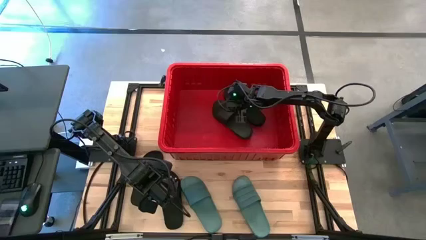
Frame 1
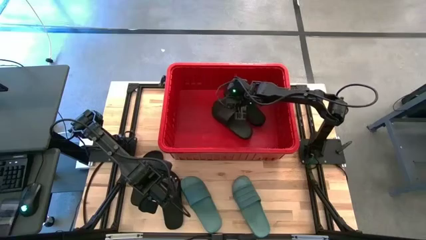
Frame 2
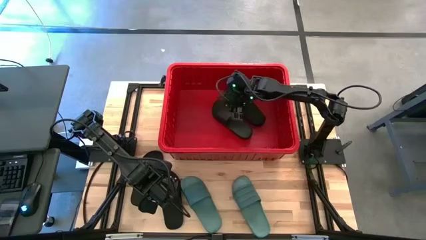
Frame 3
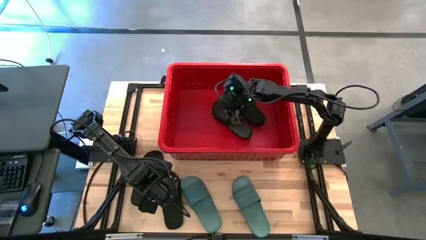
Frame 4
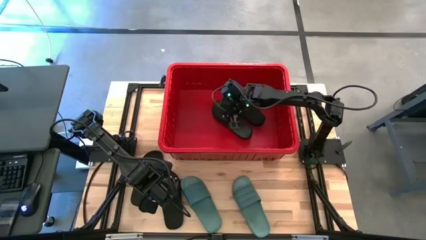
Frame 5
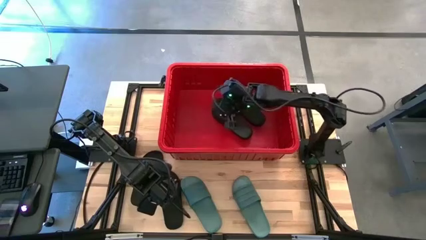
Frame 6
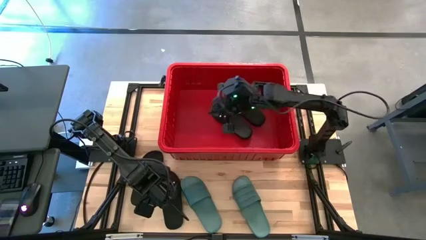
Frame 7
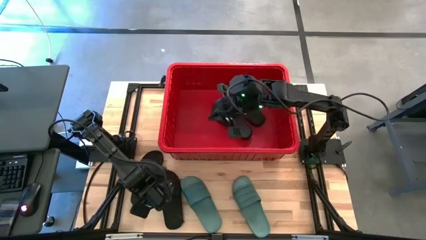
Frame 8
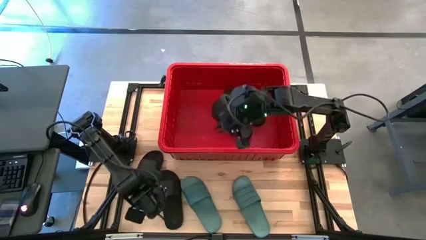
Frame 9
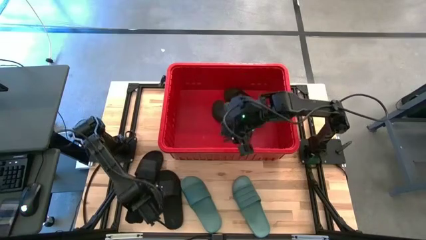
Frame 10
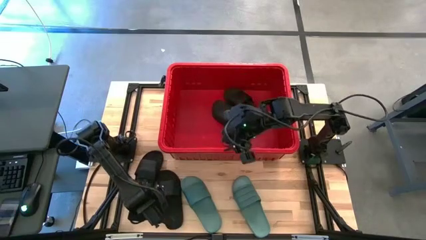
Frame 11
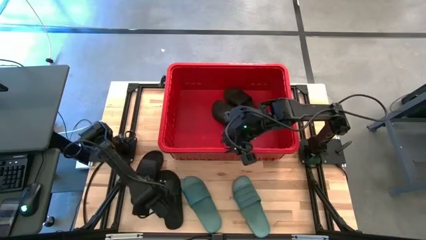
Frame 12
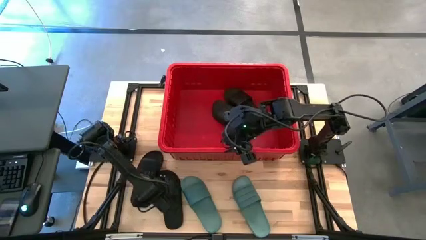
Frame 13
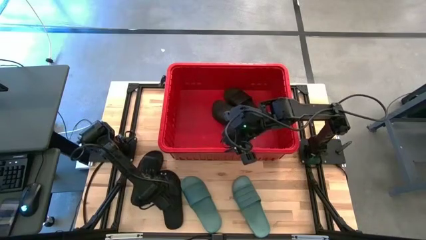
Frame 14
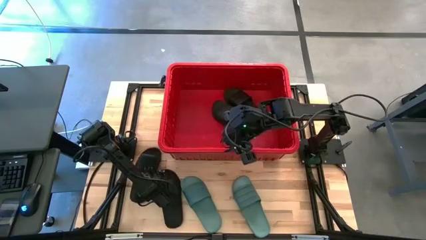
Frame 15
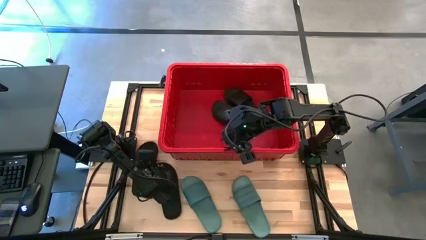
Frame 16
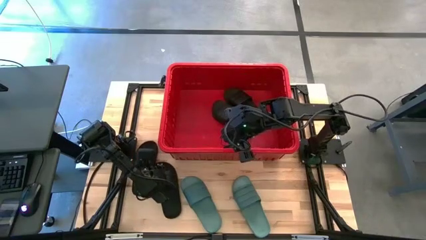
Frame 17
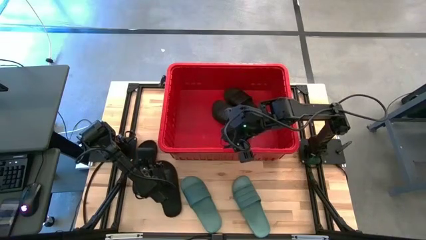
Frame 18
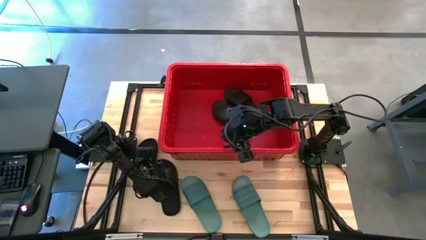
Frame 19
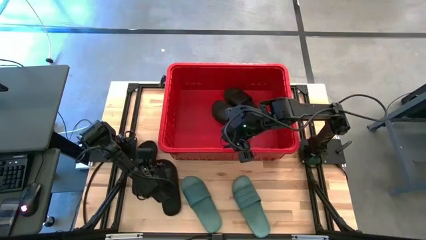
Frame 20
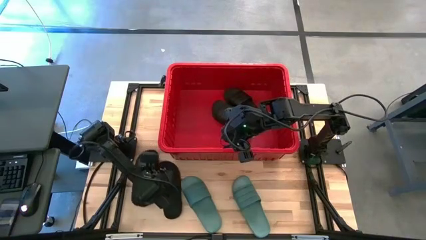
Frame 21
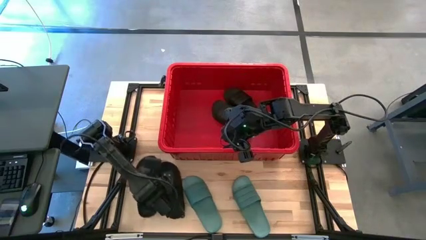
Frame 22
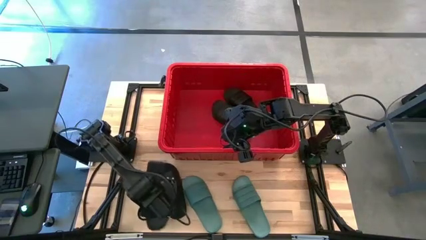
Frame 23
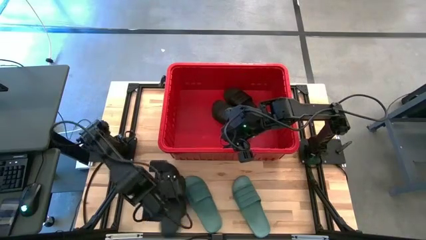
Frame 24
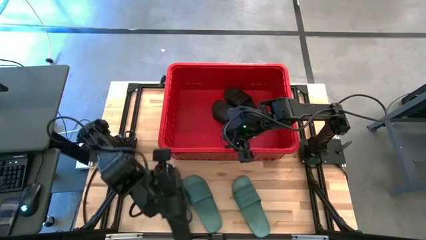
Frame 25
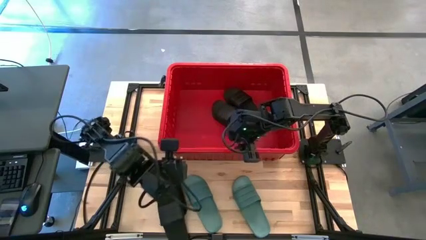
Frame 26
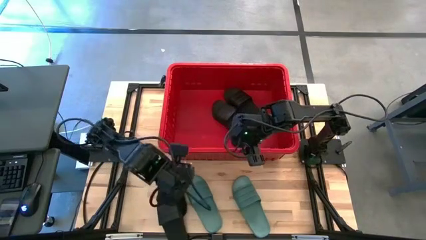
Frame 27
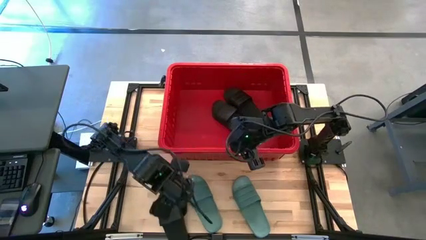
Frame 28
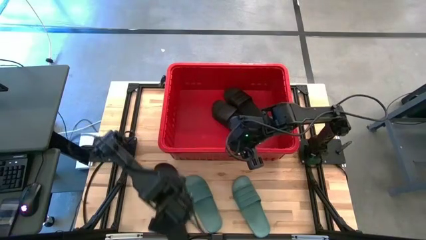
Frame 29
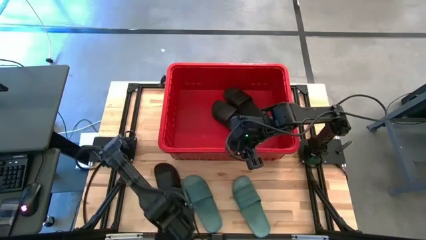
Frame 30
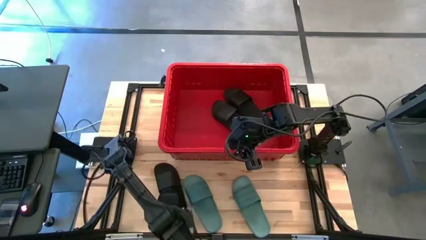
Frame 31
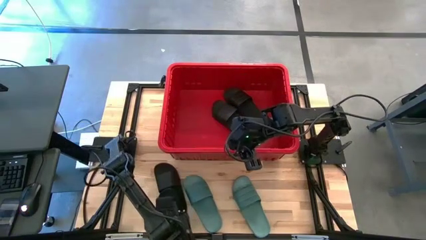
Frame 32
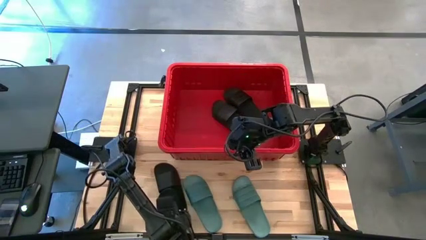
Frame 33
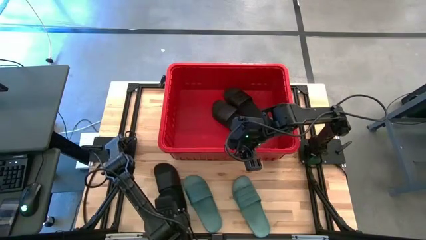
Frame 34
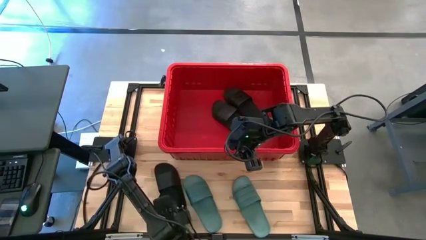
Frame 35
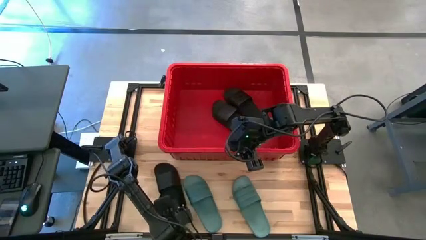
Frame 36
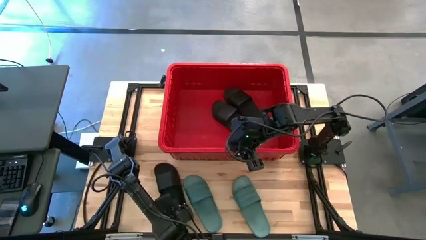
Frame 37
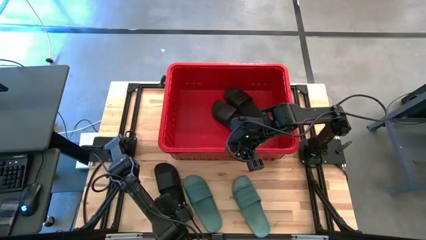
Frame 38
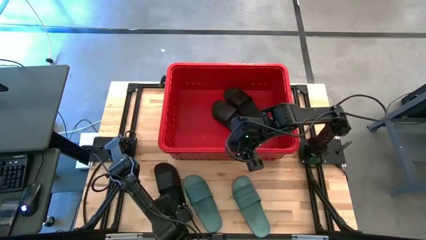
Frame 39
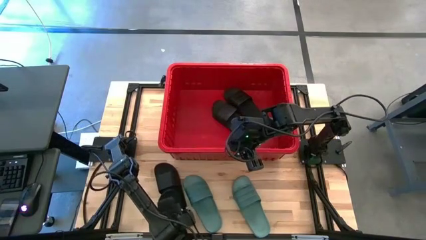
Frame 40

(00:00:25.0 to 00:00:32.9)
Task: Pick and place slides into bin
Put the black slide into the red bin

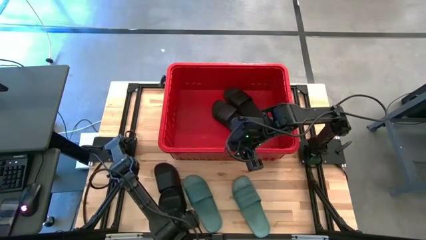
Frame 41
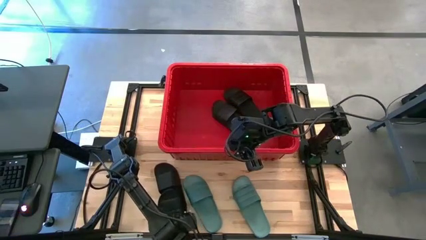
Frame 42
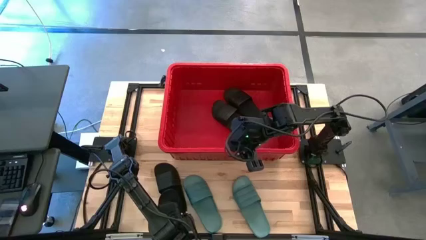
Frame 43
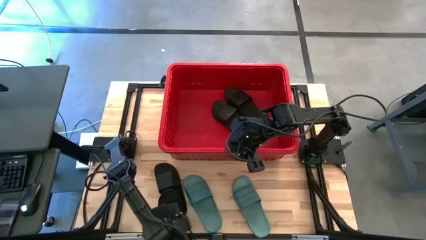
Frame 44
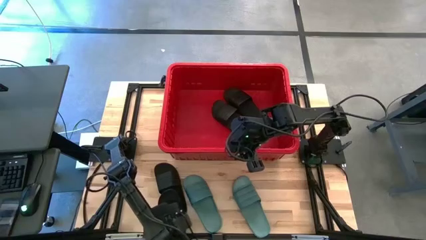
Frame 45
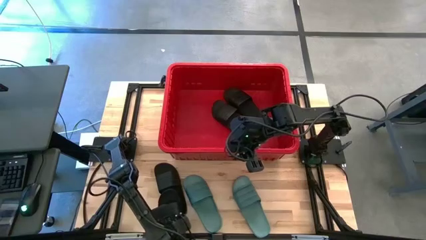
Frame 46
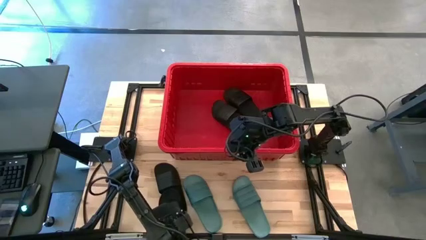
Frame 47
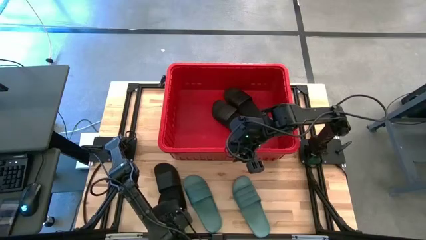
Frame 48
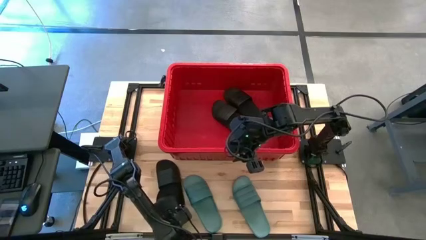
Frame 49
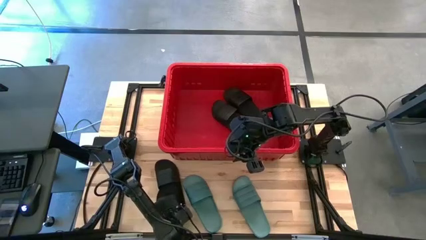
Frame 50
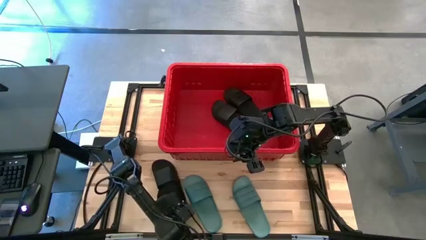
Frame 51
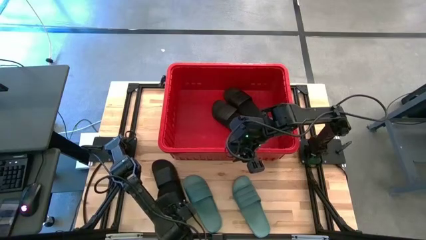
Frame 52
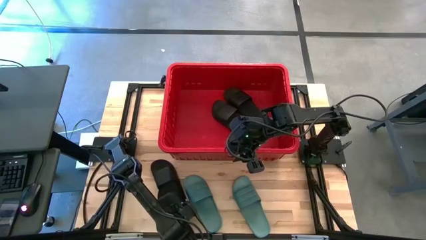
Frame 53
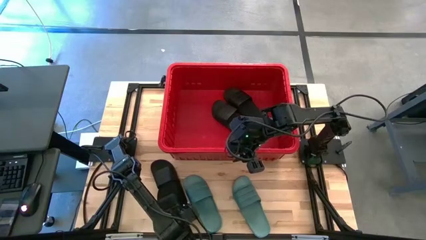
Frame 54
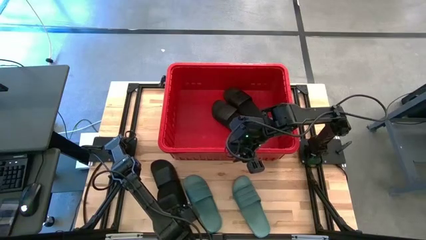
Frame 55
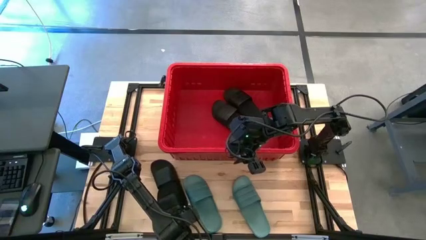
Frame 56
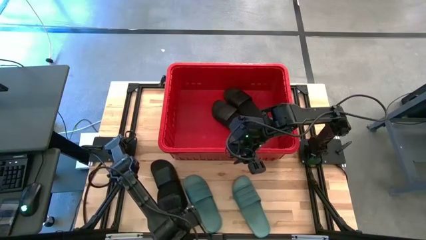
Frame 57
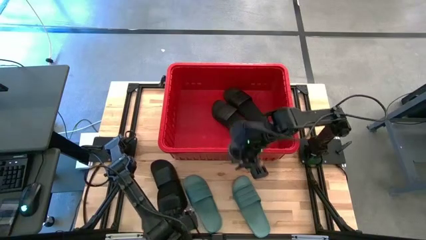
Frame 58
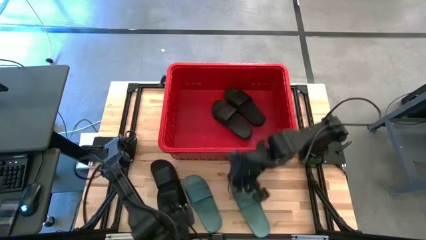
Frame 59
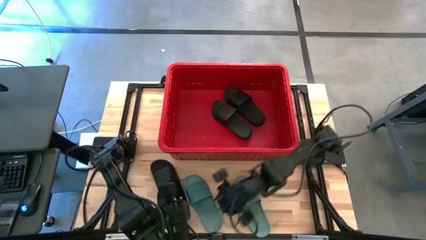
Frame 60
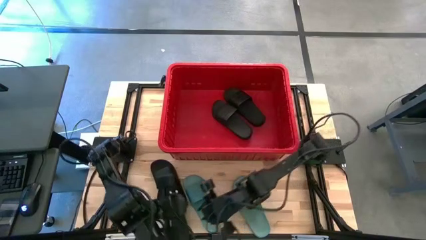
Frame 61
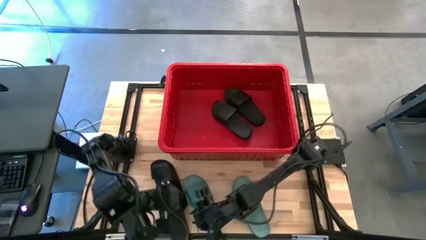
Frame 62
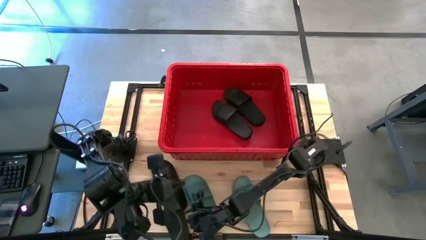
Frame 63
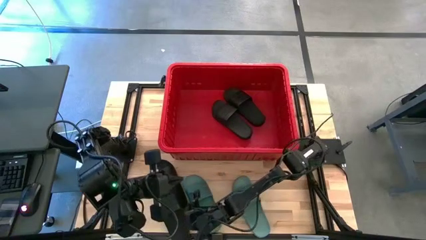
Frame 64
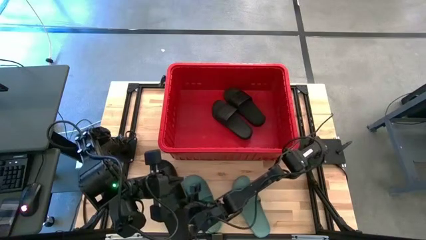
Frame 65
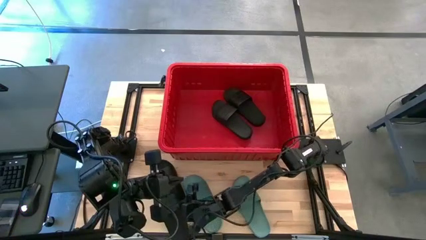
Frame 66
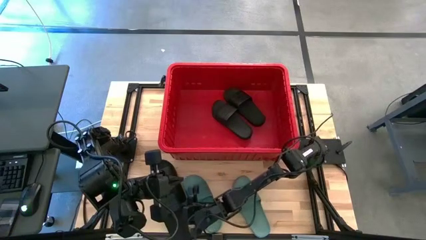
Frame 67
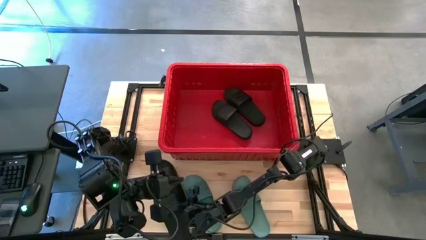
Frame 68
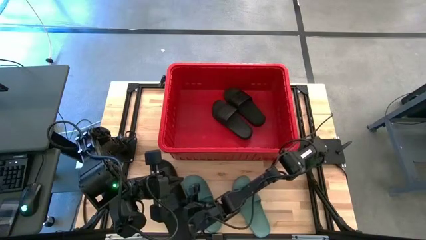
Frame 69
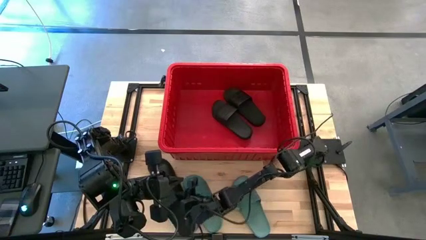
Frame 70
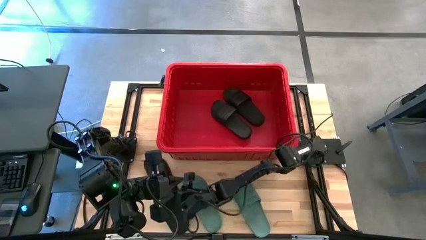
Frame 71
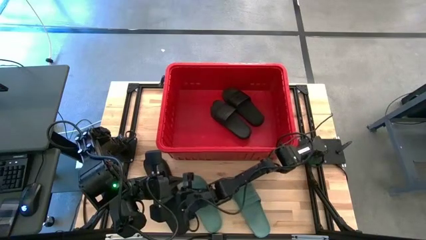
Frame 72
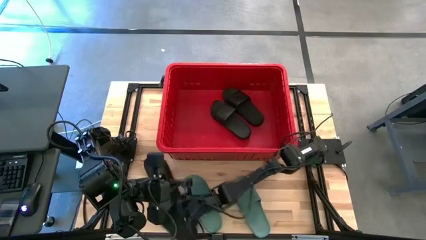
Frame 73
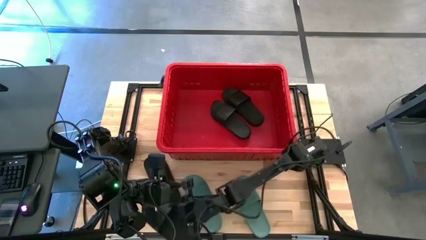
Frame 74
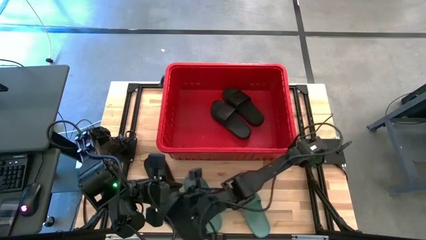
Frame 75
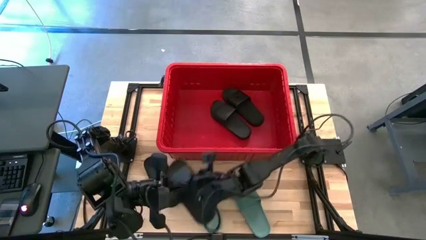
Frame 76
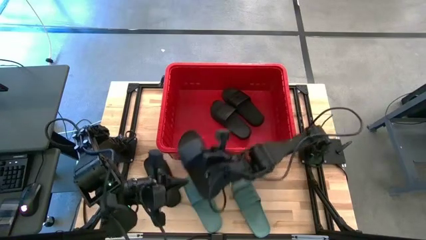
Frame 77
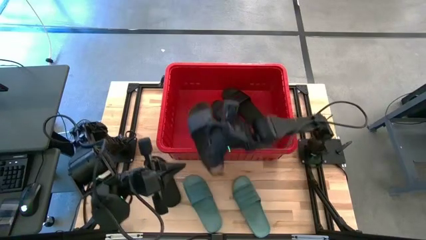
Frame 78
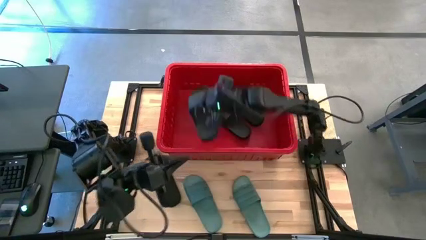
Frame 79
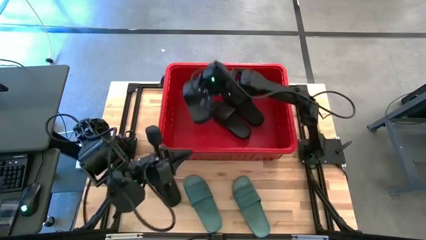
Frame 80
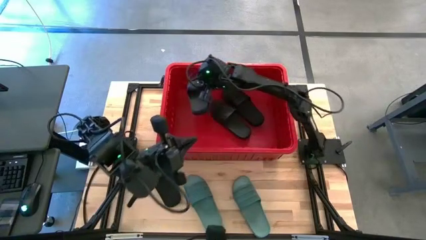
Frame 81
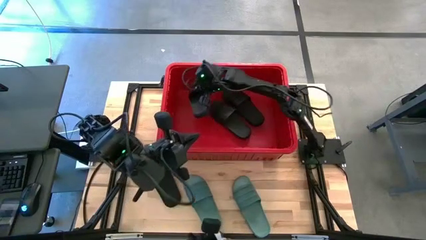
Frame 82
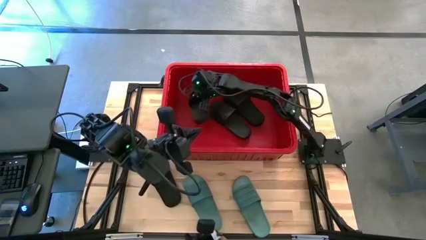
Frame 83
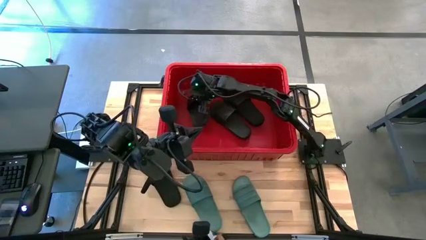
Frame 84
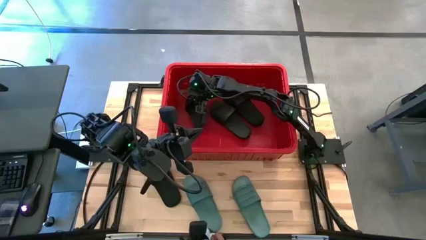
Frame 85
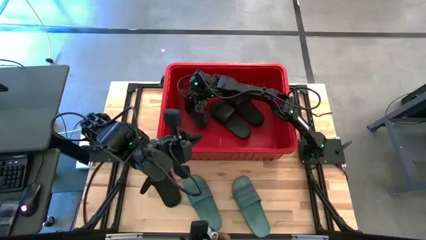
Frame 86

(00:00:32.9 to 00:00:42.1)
Put the black slide into the red bin
